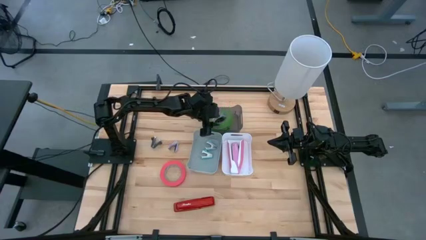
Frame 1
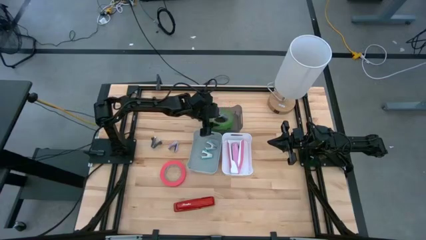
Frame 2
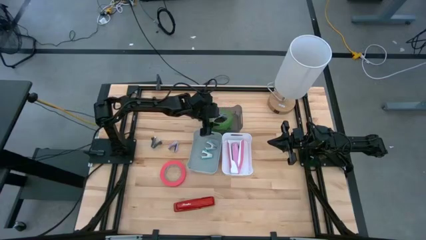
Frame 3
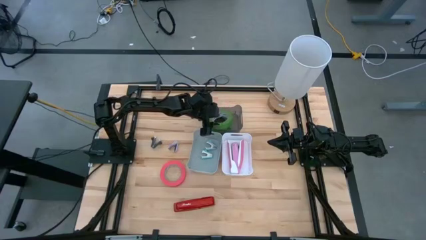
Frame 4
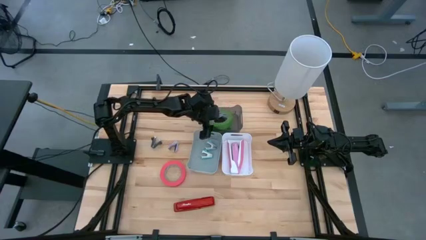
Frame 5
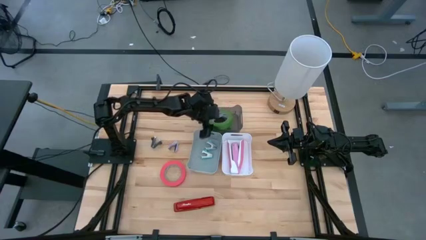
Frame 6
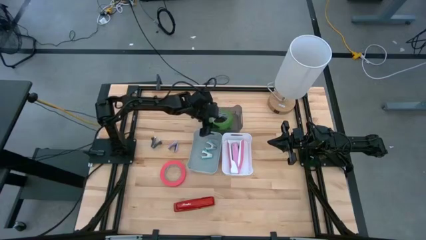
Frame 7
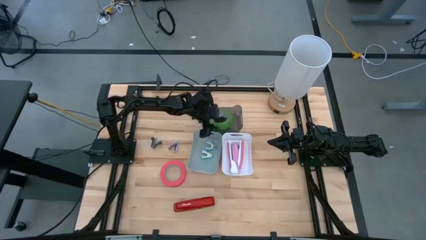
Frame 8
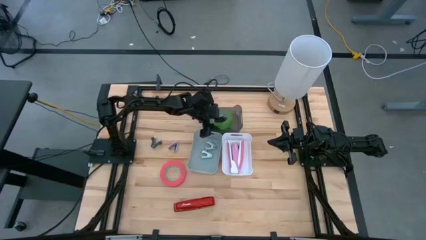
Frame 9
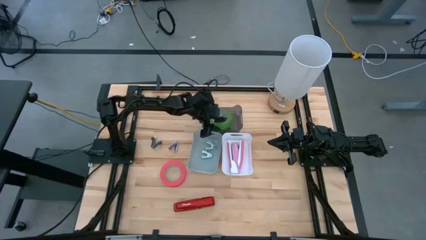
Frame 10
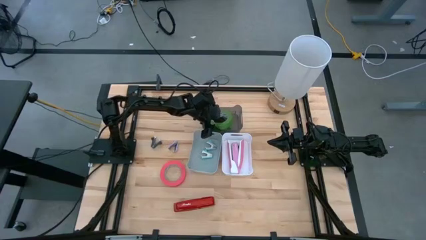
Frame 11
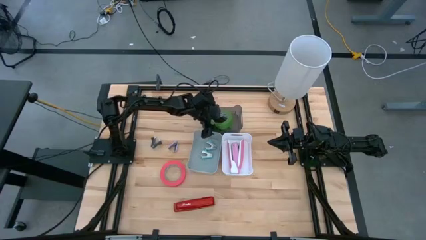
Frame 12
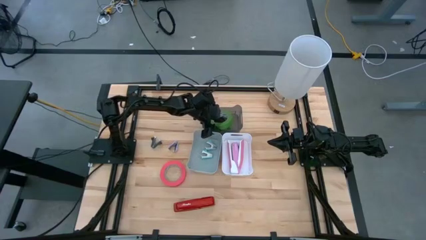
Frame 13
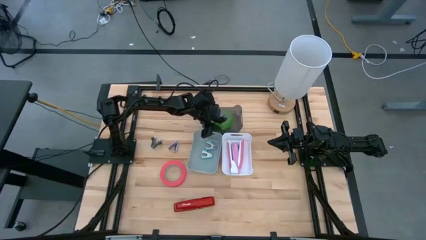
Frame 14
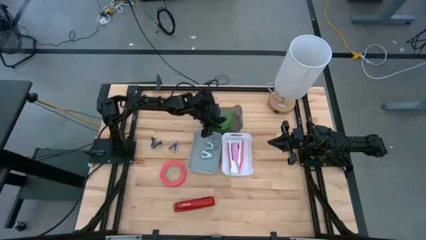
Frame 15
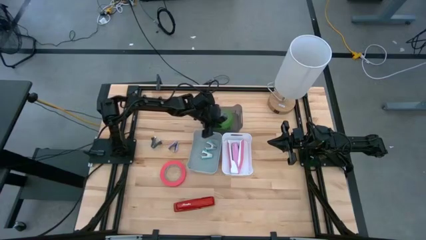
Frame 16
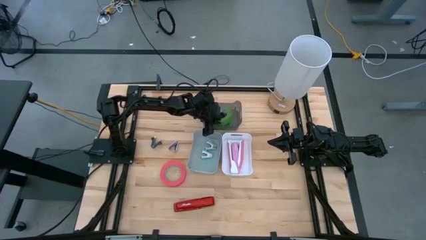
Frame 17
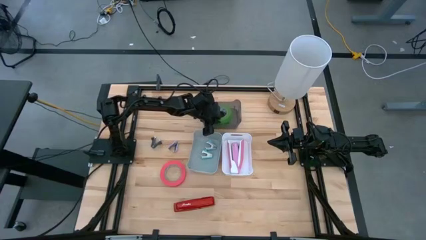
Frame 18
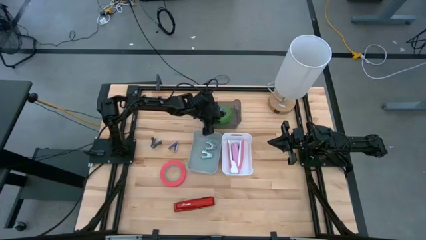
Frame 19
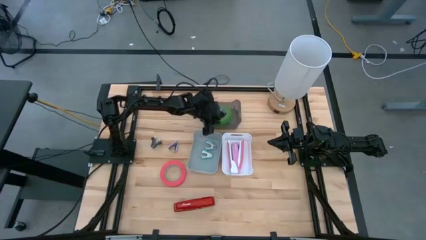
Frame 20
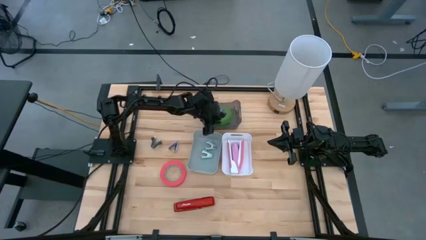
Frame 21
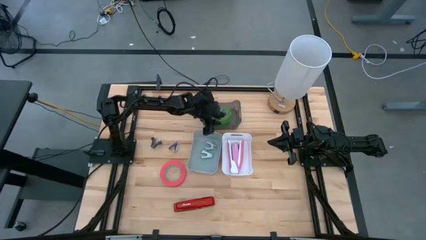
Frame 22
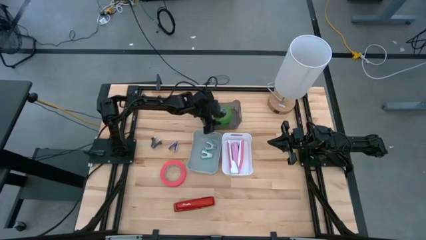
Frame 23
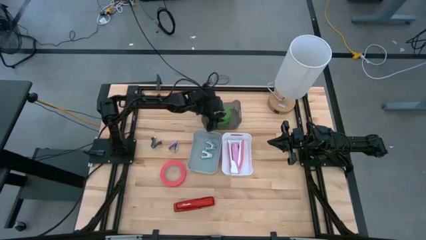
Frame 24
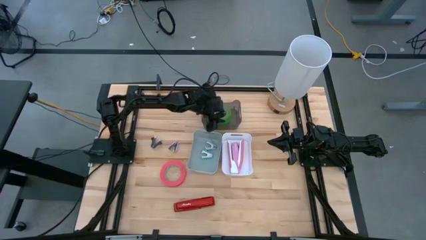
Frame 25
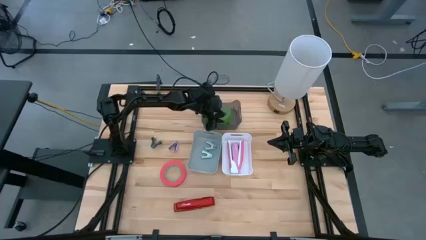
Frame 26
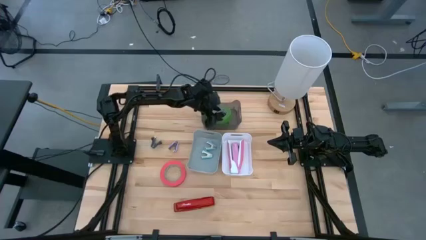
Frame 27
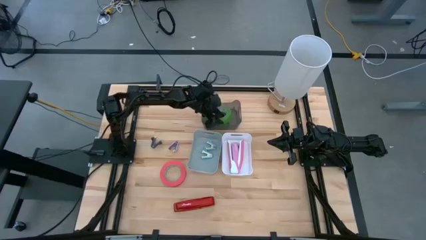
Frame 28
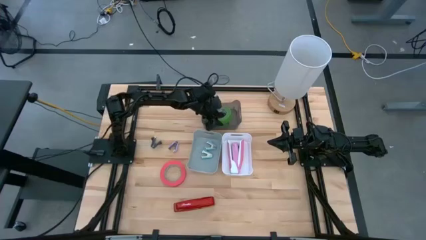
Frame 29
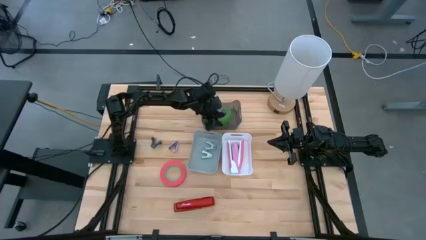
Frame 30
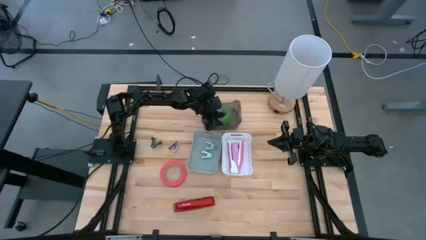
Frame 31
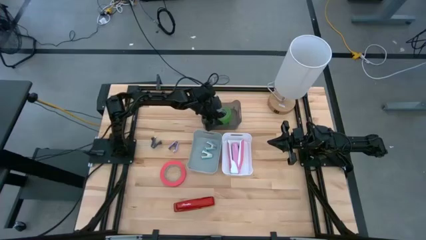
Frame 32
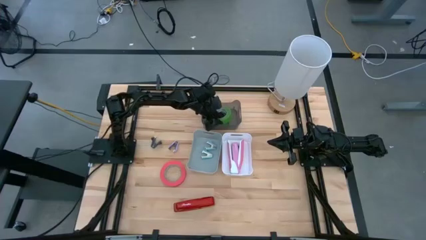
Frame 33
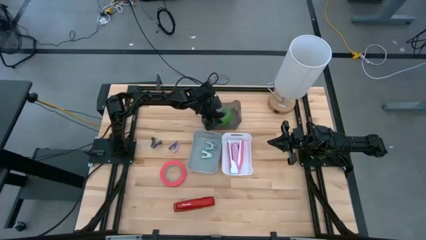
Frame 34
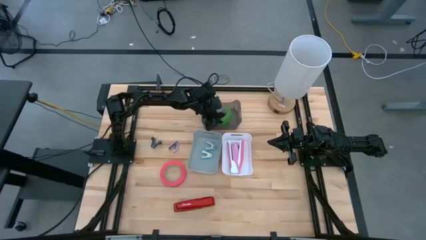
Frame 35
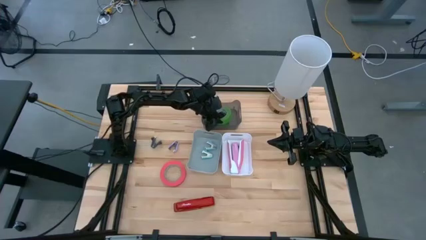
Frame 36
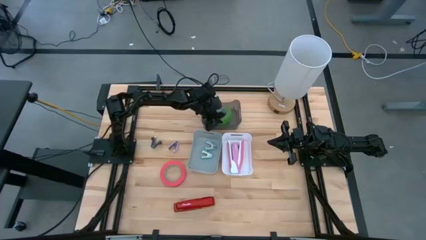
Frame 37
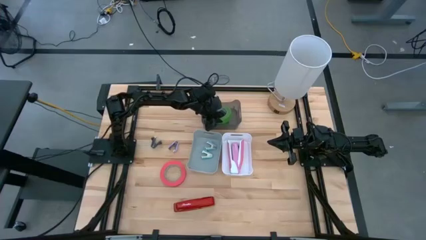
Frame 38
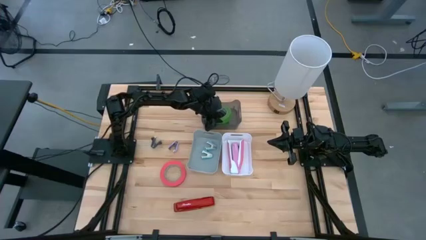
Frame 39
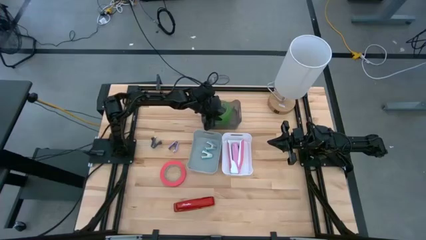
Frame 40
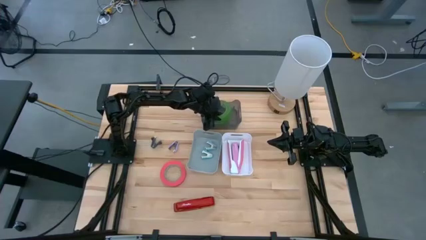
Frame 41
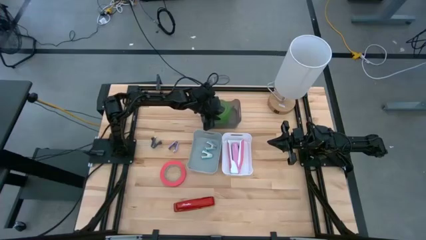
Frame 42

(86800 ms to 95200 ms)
Task: Pick and place Stapler, Stapler remover, tape
Adjust the green tape inside the black bin

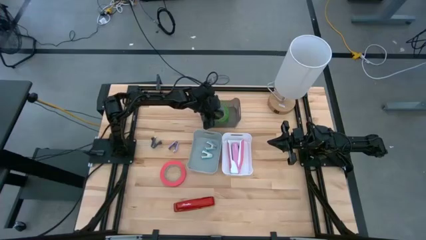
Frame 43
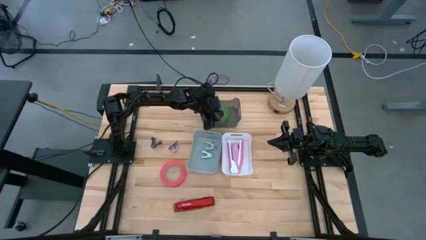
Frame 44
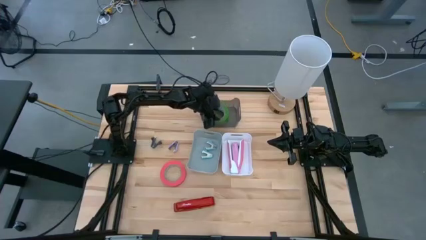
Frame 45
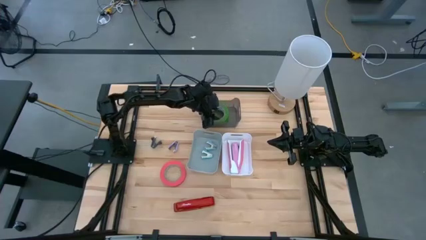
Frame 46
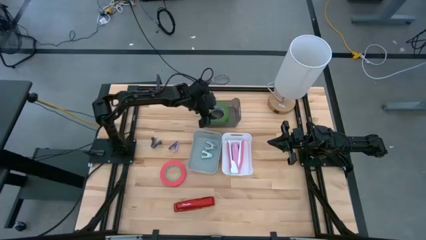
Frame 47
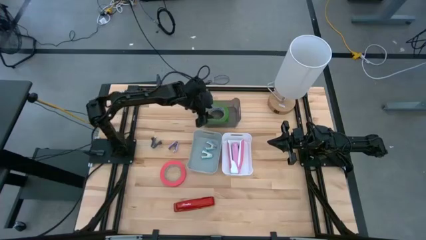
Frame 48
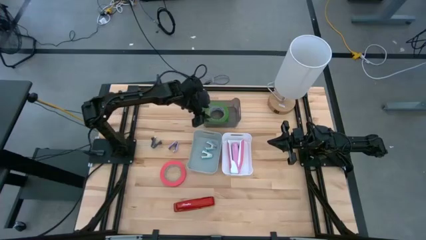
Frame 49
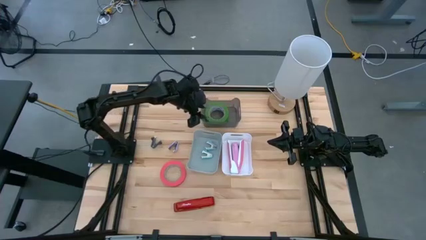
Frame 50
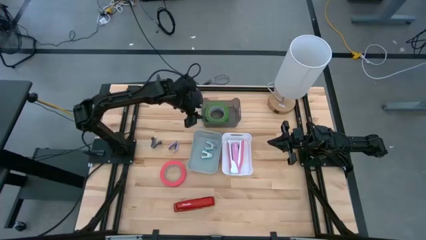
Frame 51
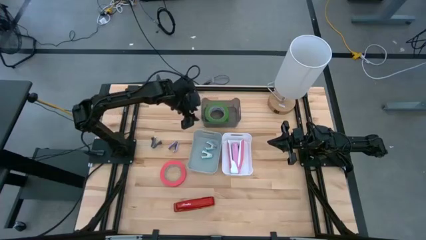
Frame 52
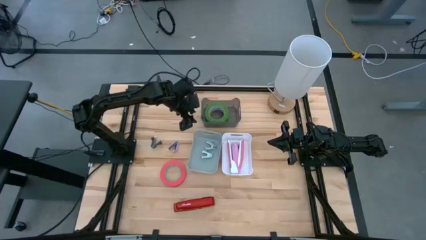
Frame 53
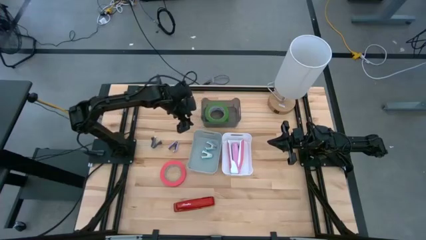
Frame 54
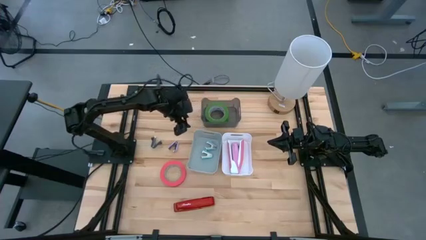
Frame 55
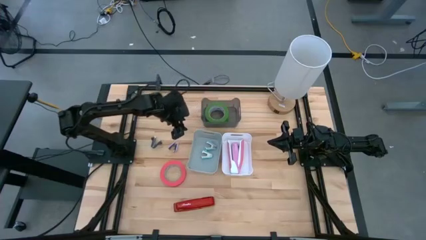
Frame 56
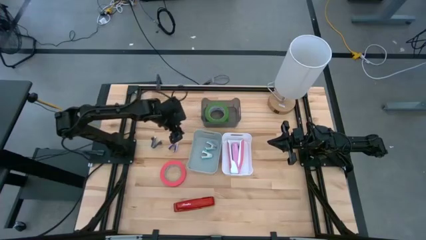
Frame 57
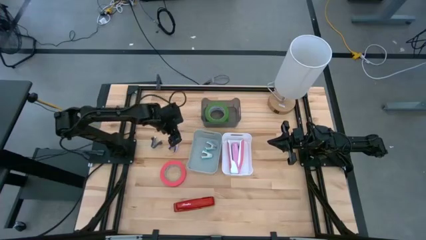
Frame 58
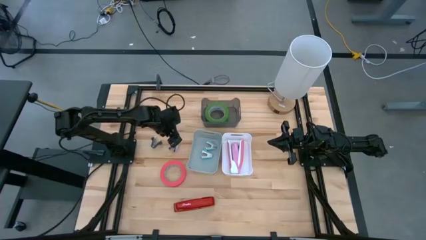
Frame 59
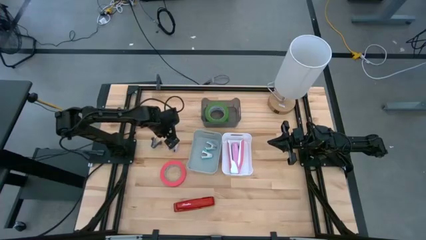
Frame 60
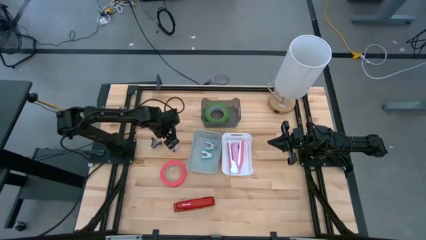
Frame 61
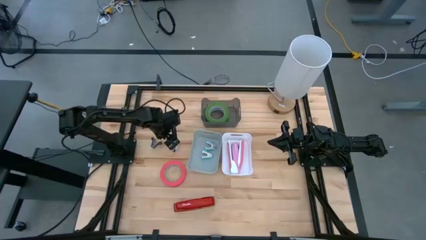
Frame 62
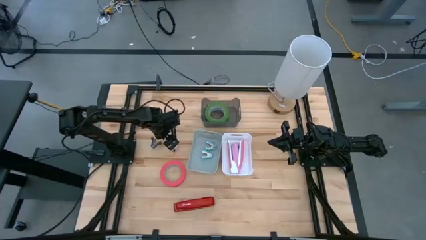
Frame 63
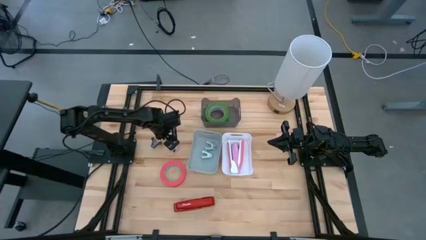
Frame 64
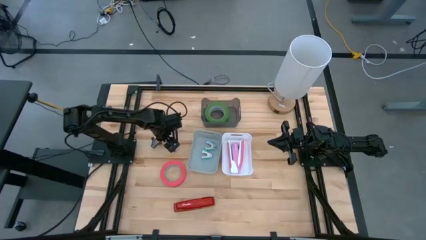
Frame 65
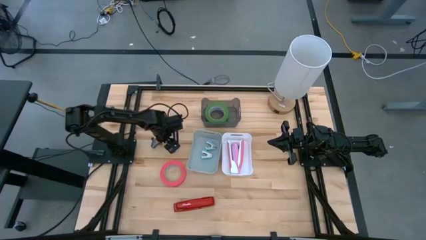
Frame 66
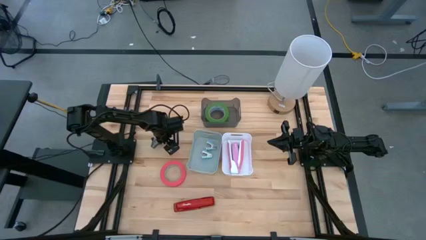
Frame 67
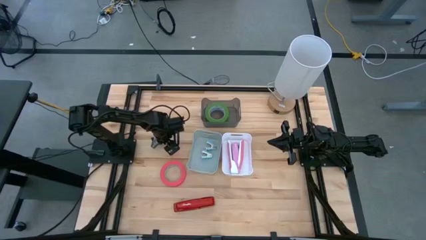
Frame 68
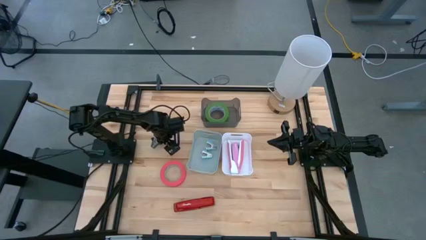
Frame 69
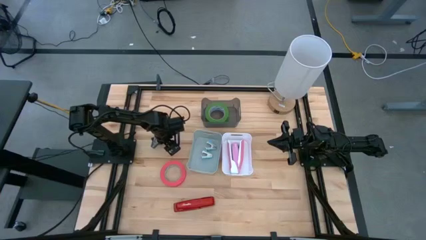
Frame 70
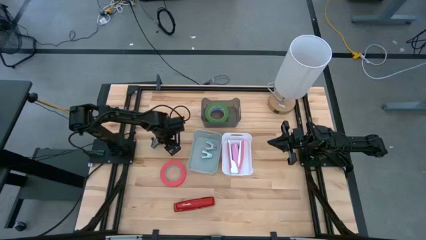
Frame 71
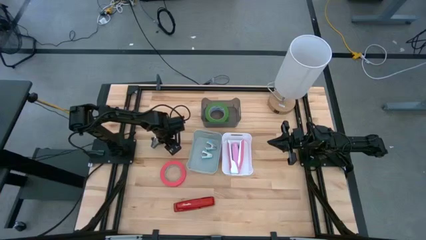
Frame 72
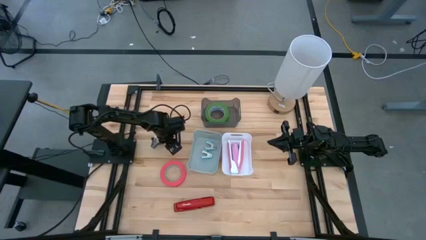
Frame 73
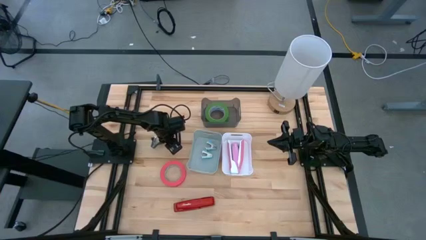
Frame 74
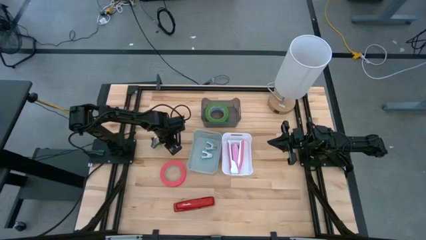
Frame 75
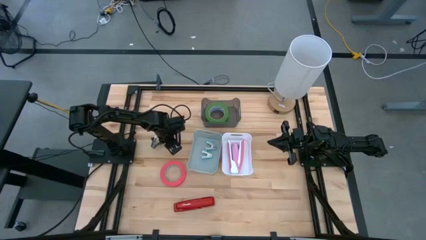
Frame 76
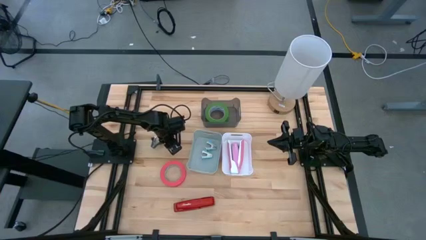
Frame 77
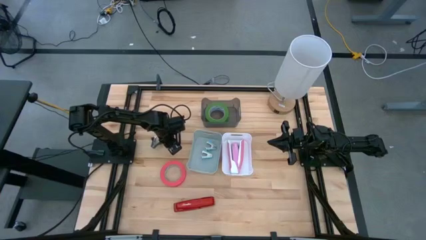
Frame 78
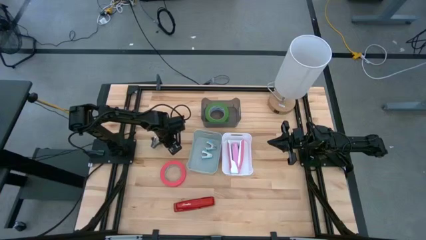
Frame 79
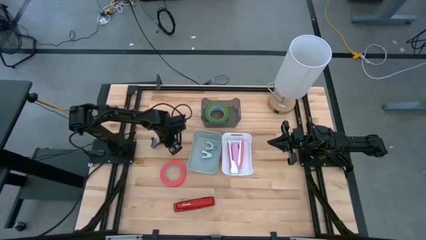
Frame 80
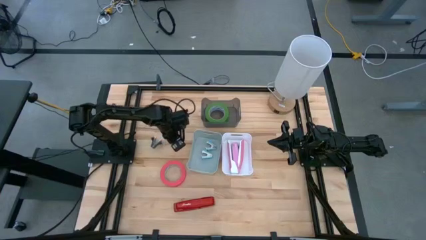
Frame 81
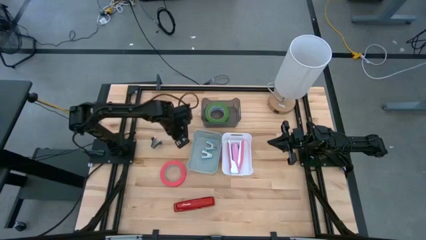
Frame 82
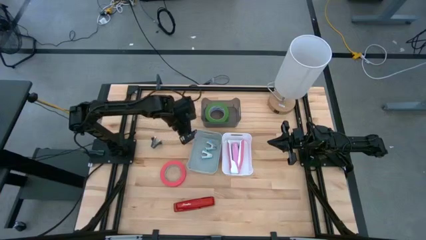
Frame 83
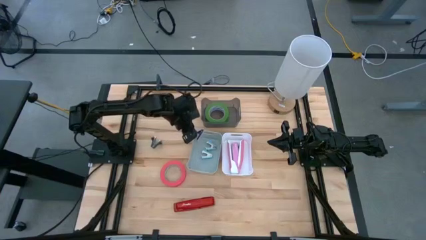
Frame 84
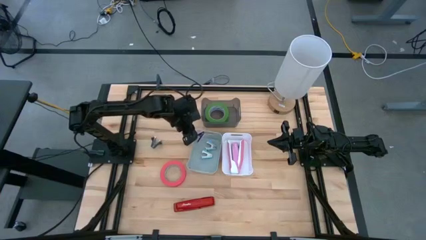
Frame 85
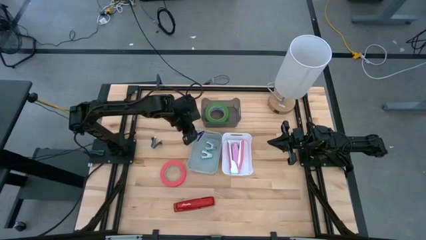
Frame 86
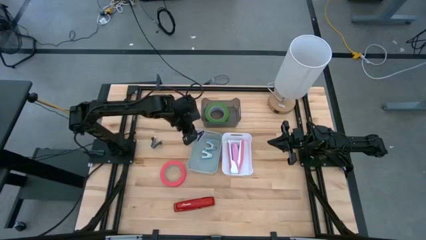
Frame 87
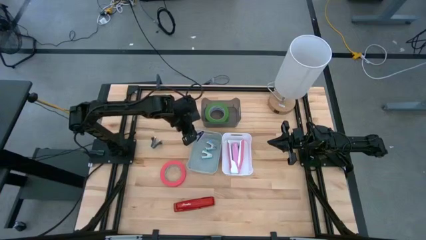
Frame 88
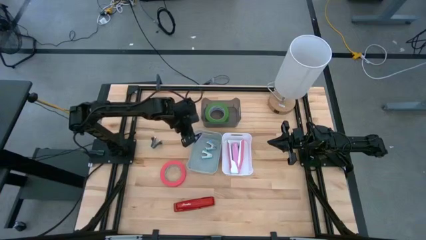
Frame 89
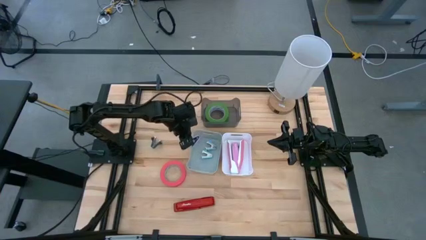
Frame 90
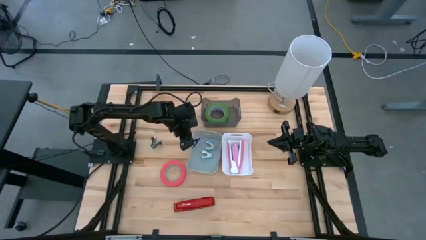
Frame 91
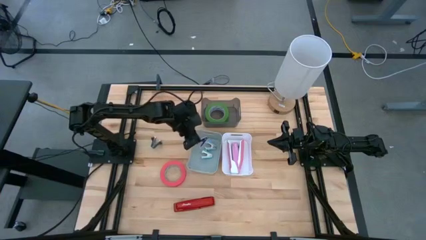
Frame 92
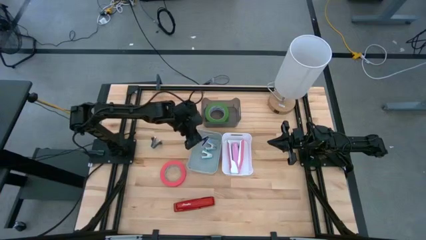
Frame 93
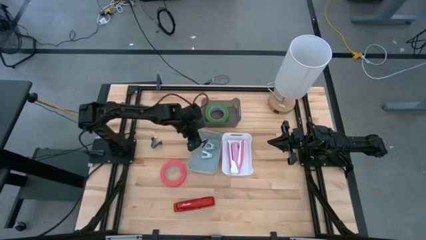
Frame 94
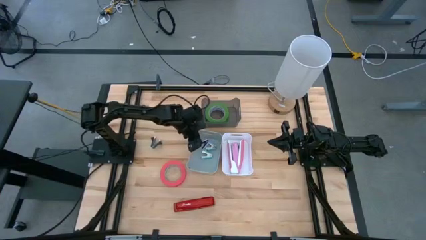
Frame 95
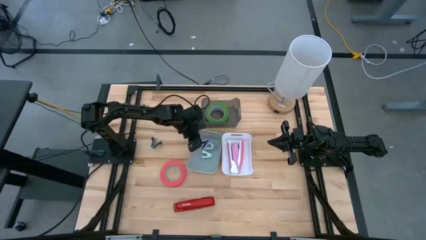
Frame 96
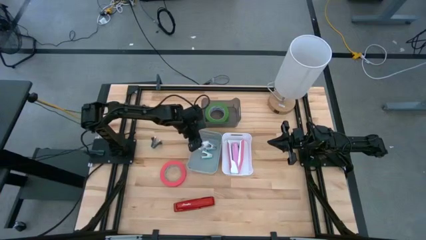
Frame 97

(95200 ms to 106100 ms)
Put the purple staple remover in the gray bin
